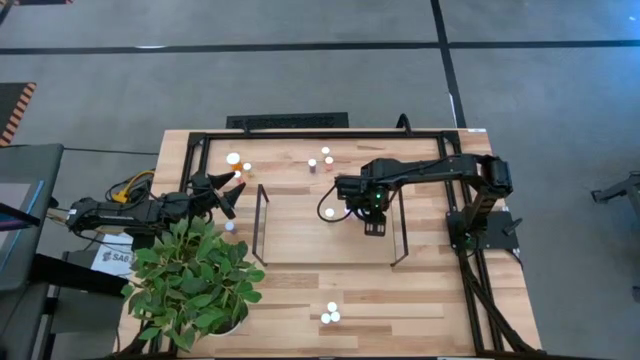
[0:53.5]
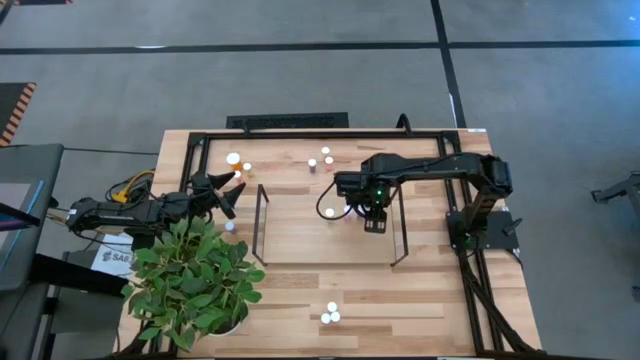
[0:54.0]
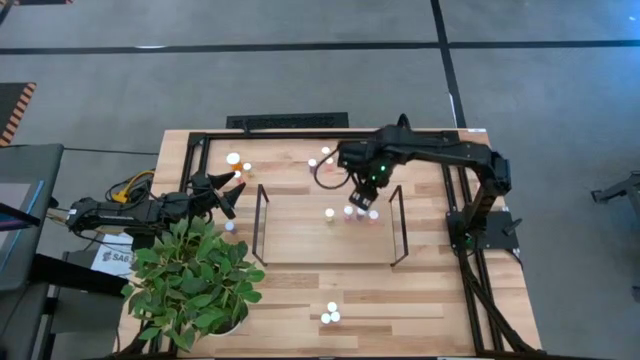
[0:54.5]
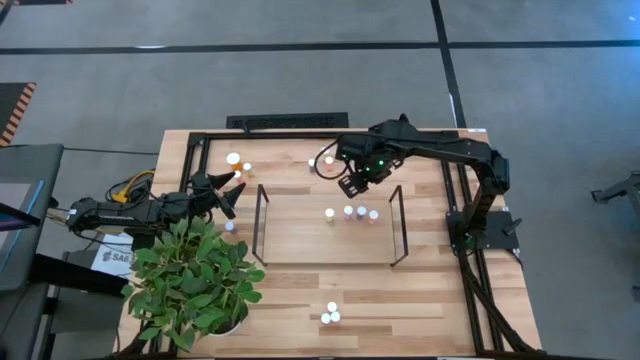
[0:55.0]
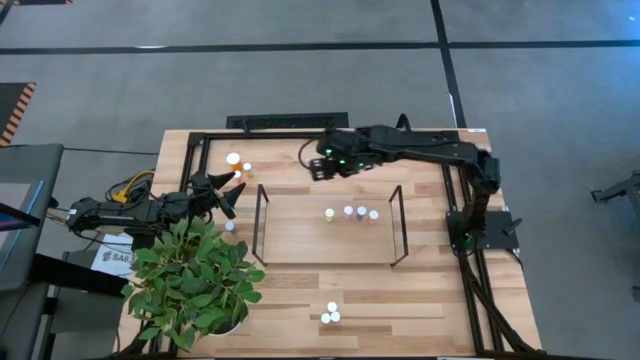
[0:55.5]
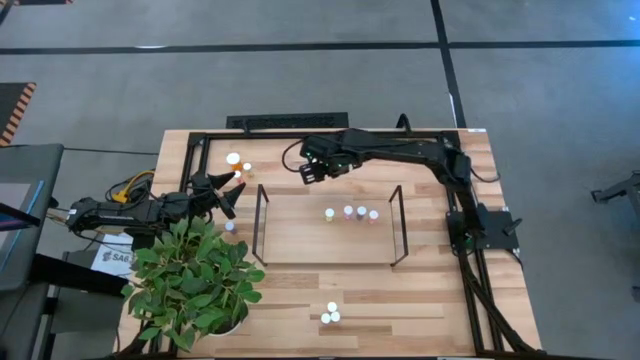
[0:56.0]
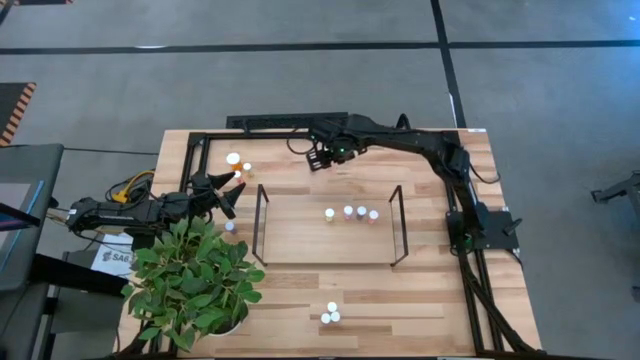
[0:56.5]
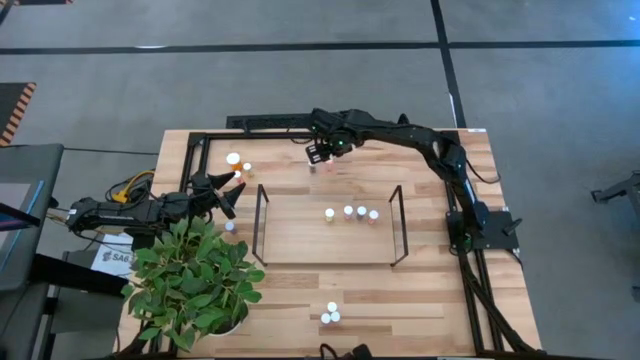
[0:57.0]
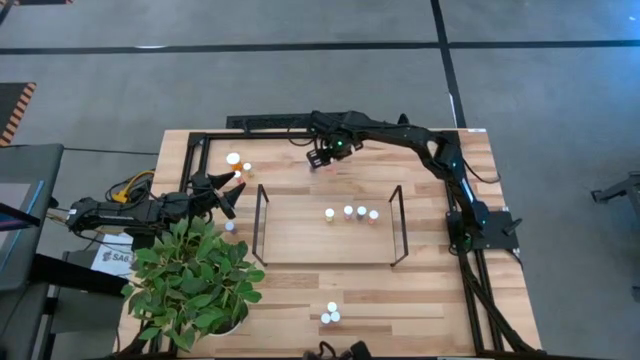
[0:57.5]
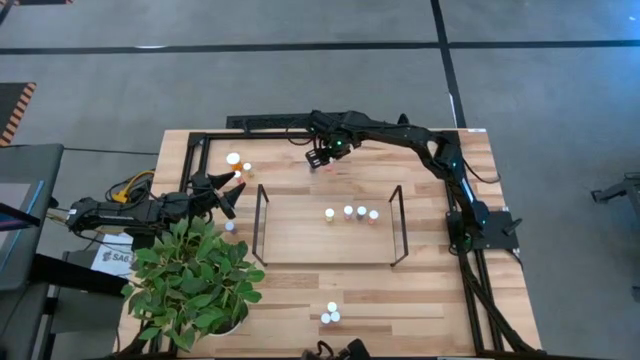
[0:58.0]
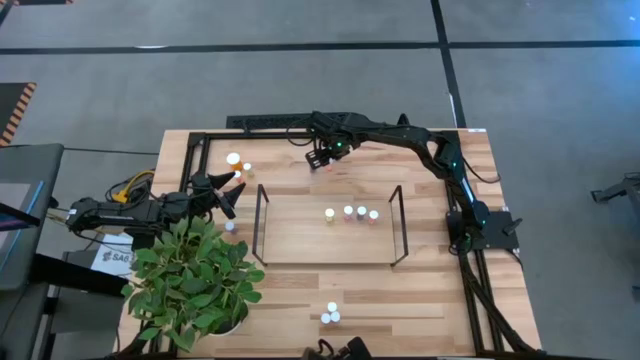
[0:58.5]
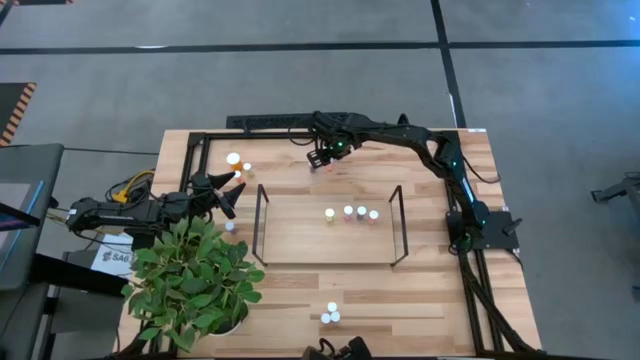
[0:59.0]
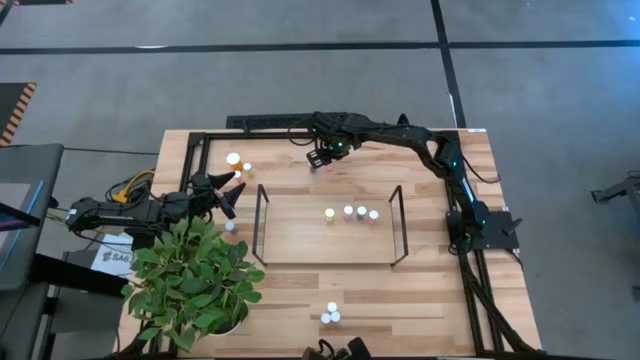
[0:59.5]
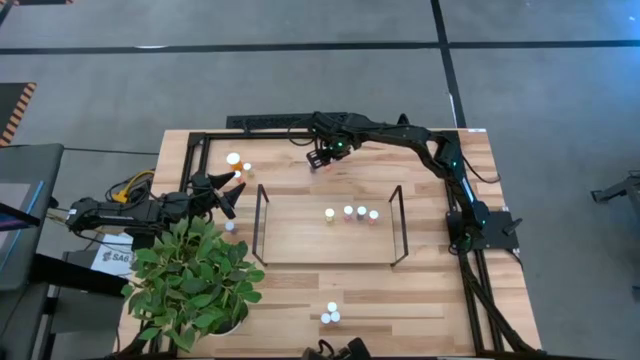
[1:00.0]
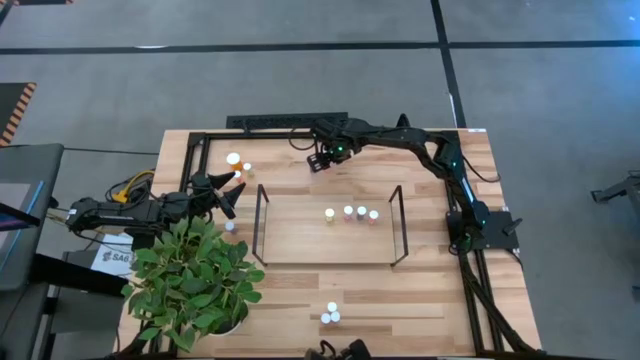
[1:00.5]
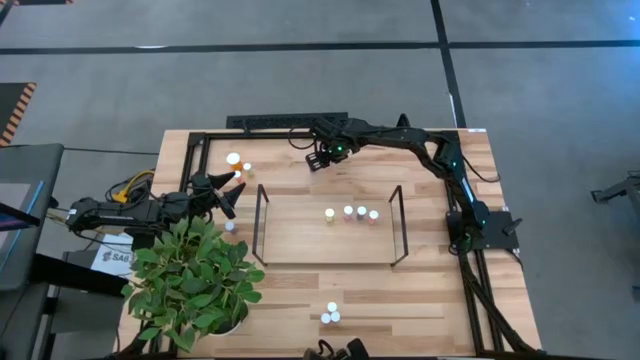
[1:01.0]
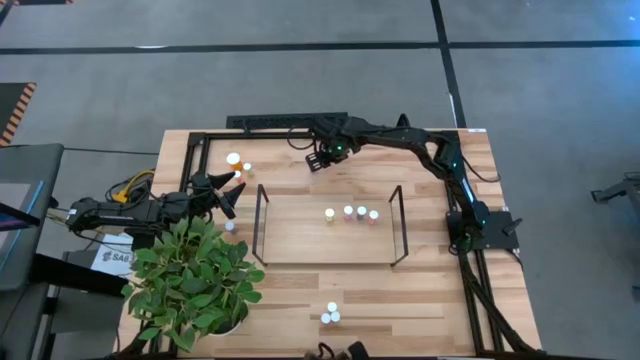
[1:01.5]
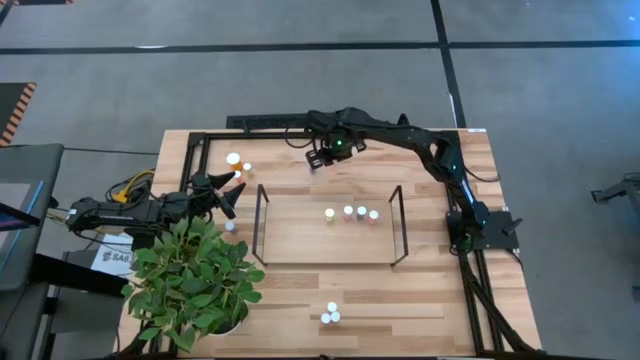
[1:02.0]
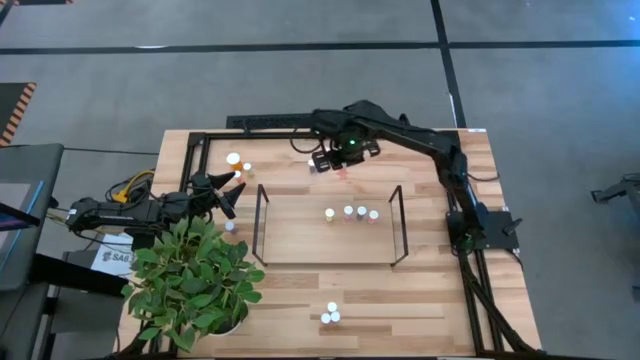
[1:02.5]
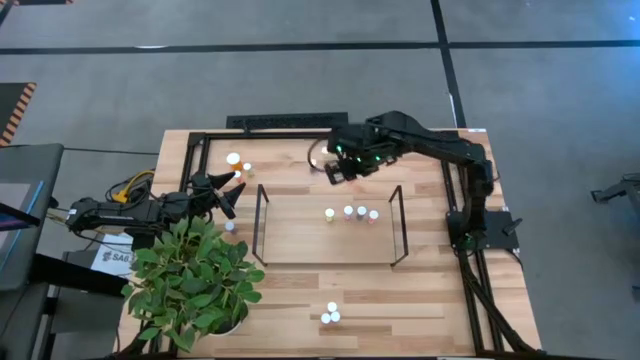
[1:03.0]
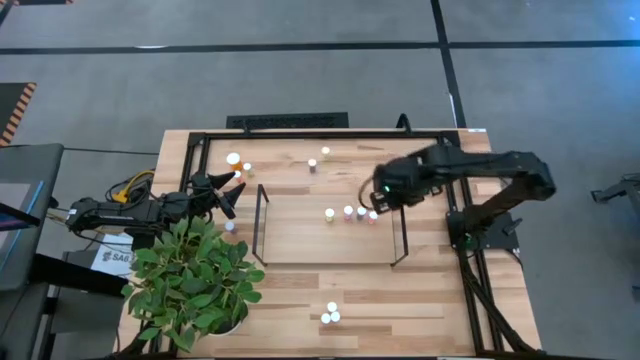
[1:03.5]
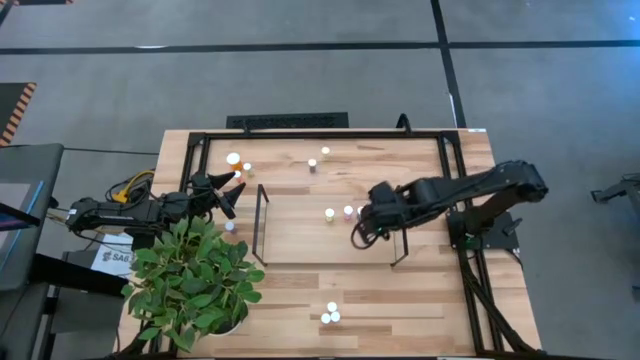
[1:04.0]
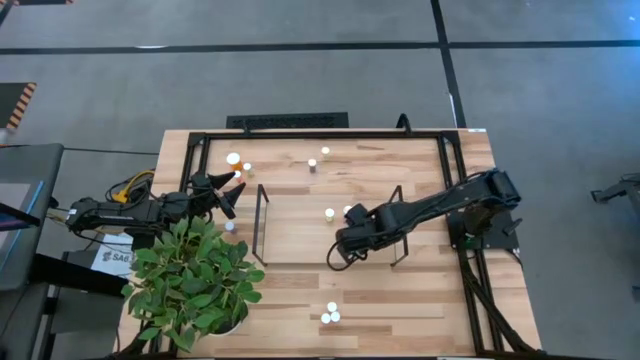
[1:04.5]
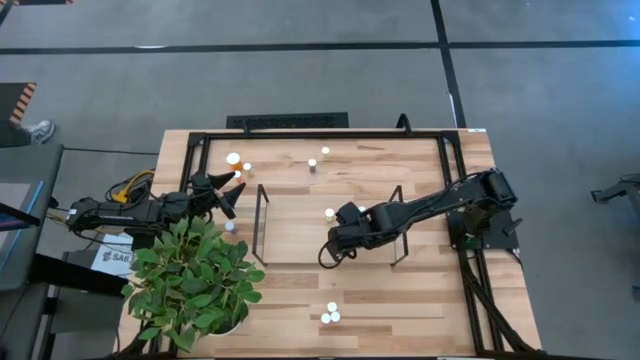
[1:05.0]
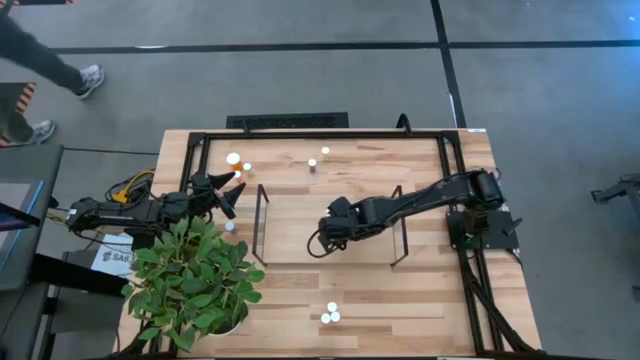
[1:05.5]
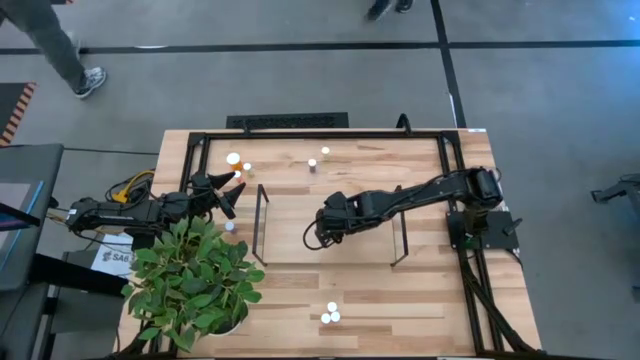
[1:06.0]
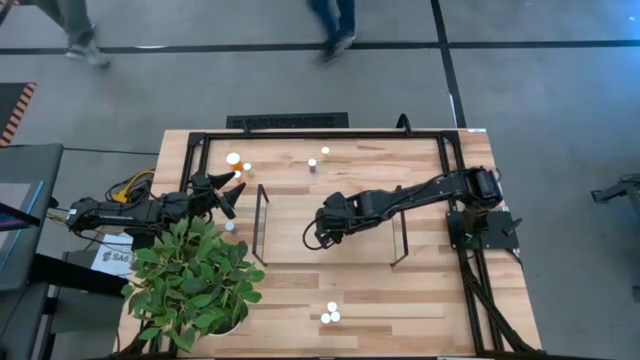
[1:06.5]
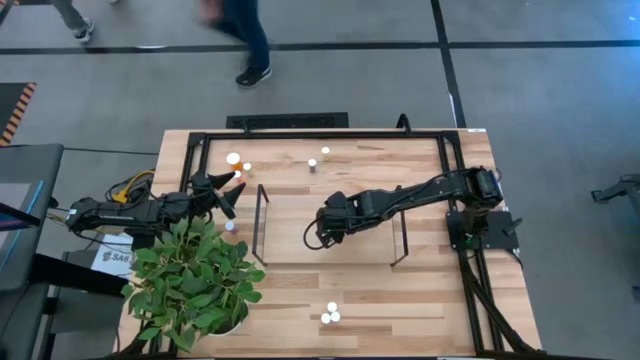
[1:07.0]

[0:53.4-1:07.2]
Task: Pick and place medicine bottles onto shelf by color
Put the orange pill bottle on the shelf

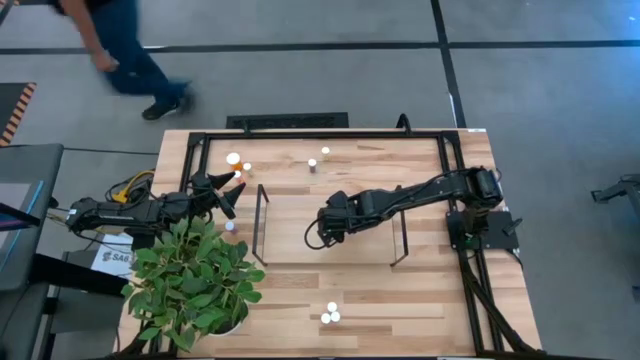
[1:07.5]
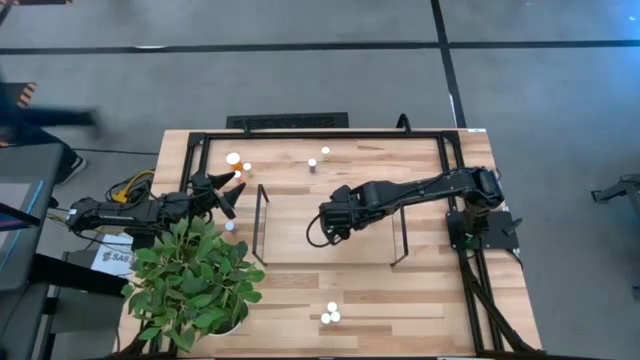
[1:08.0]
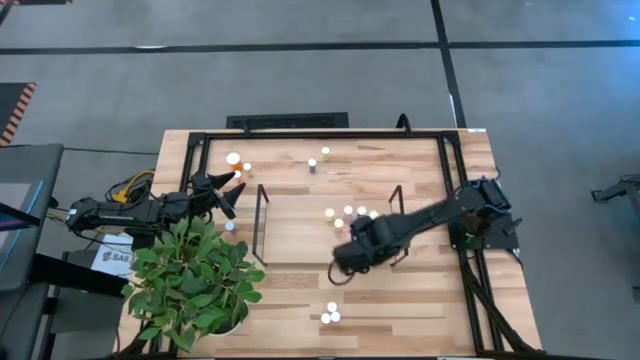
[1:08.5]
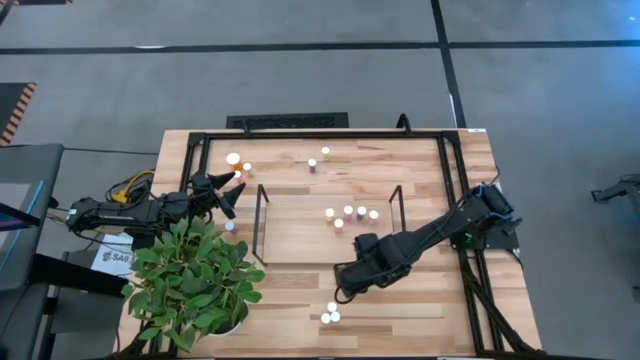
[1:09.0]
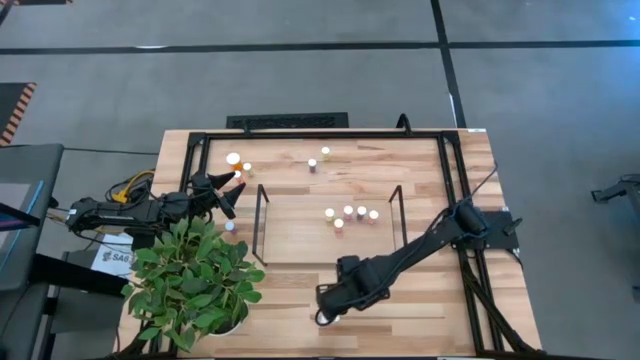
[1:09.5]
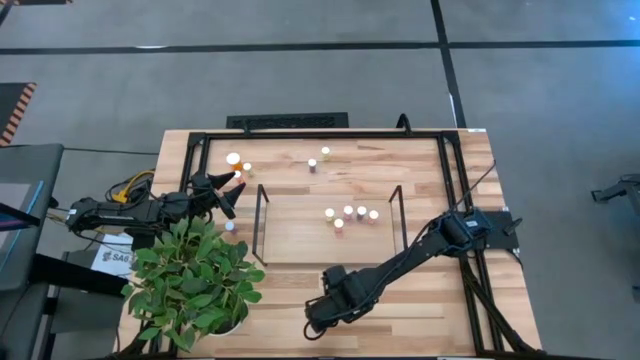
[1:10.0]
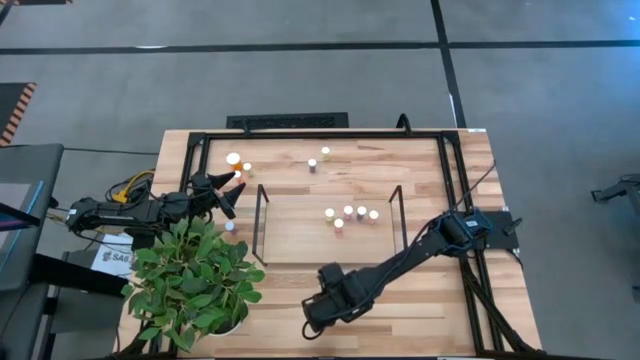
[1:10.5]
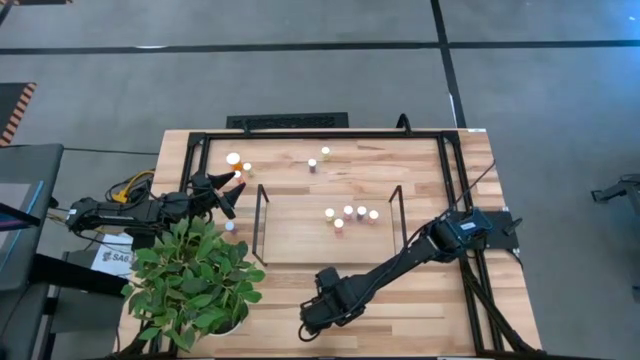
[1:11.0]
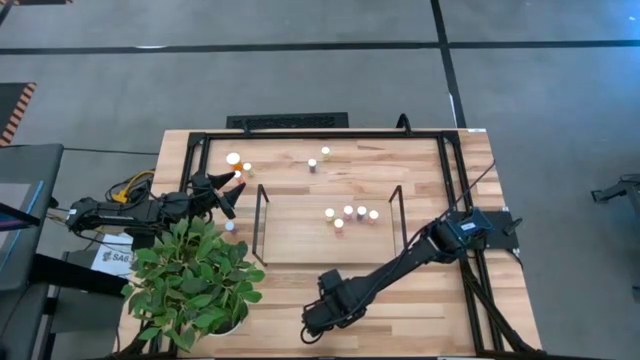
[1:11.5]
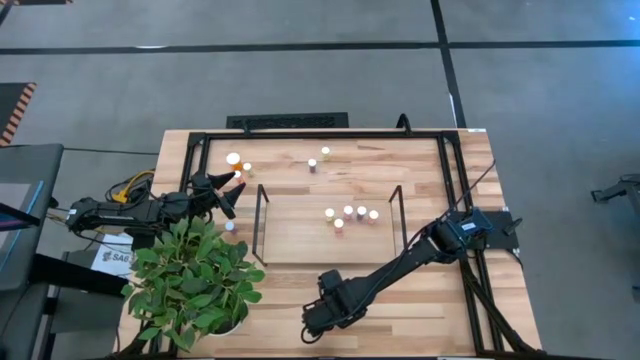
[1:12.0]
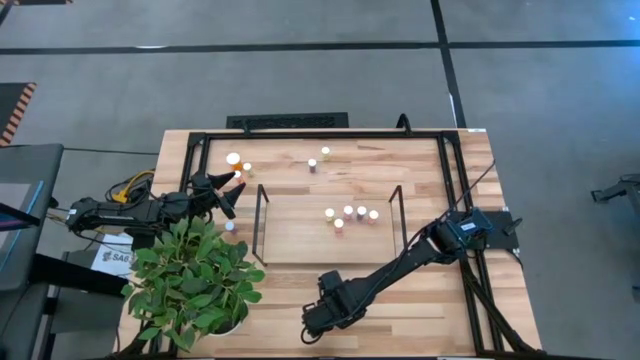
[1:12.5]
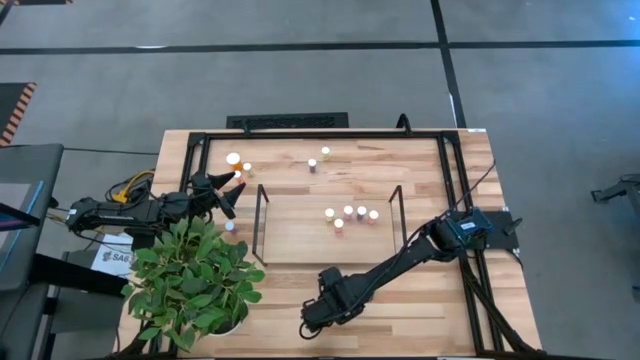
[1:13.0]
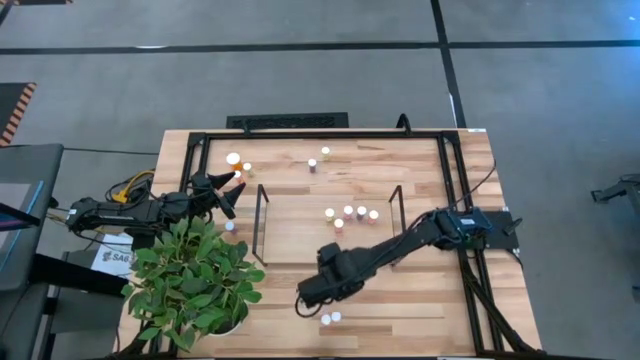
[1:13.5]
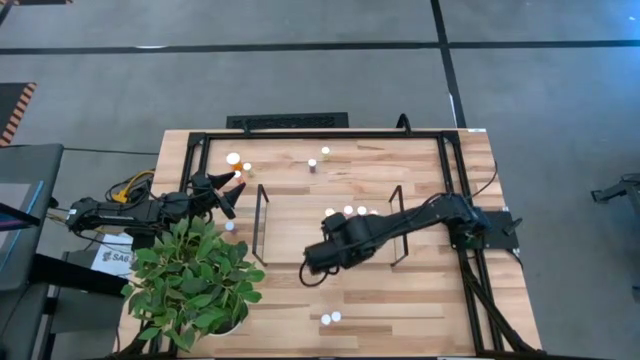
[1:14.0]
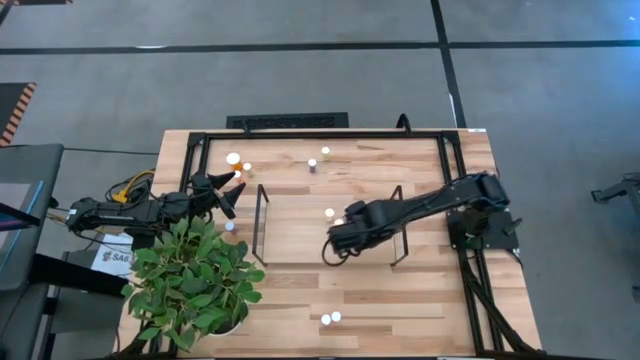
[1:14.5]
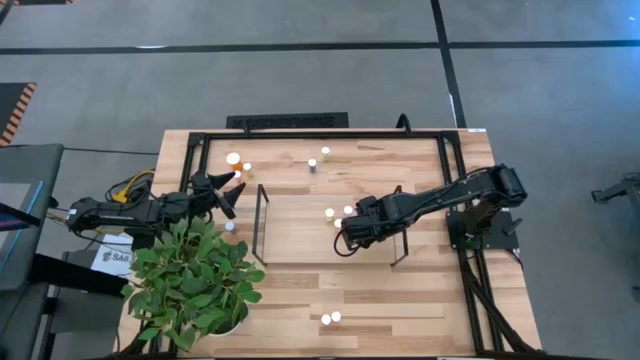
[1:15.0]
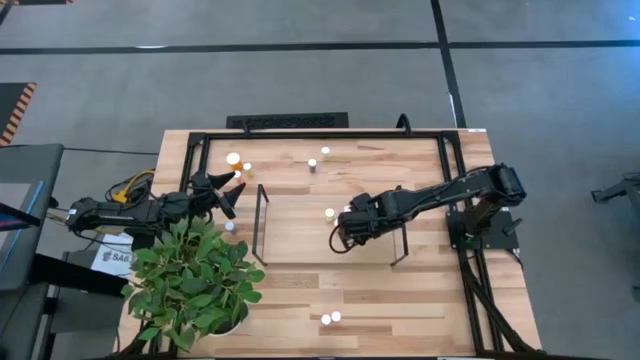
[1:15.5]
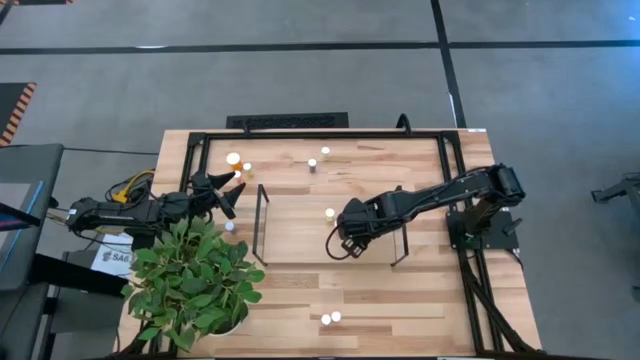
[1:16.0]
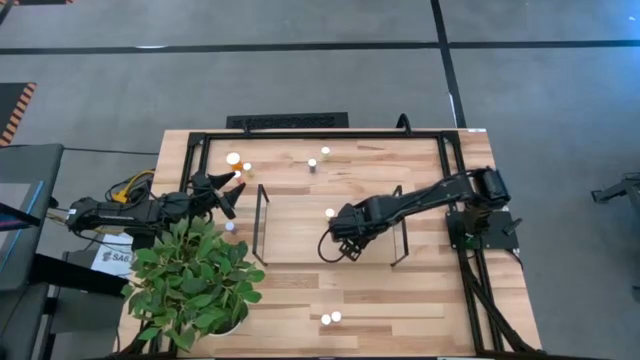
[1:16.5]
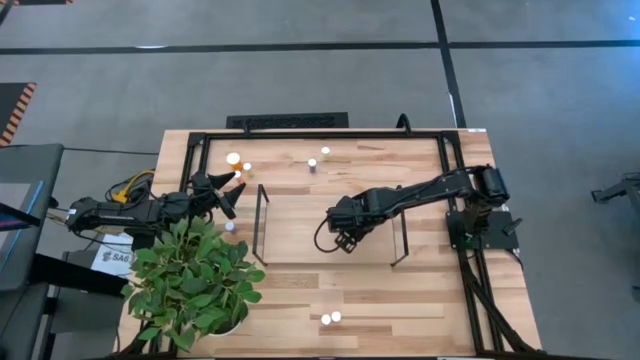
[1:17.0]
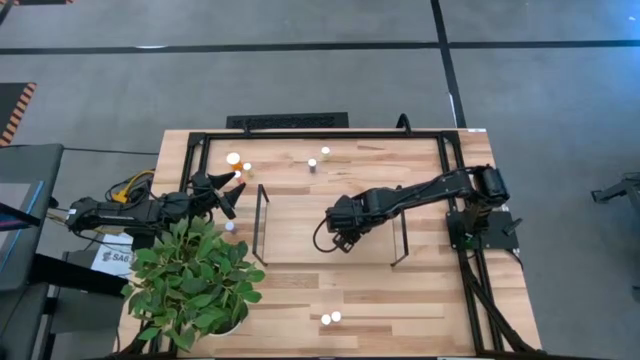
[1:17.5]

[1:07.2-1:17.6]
Put the yellow pill bottle on the shelf
